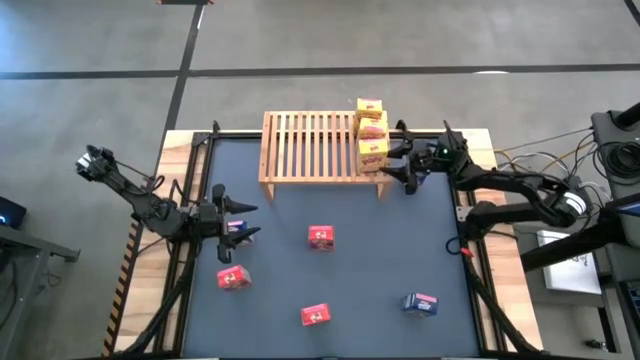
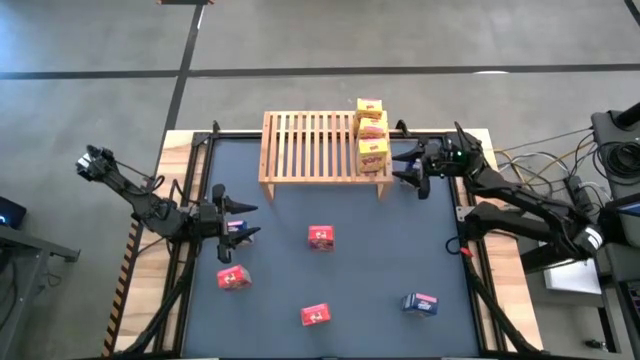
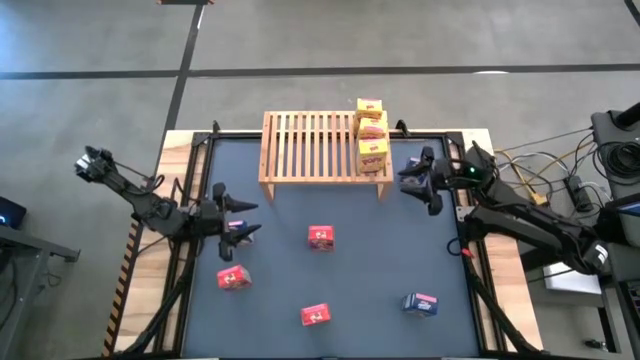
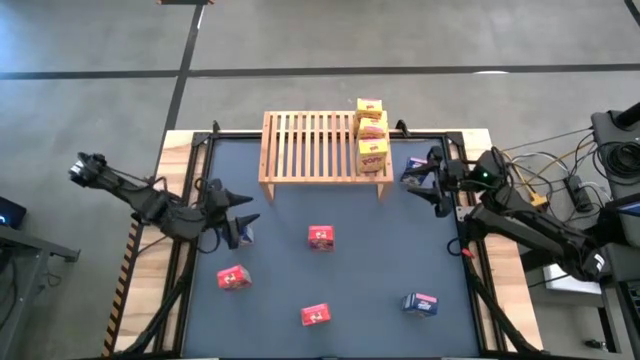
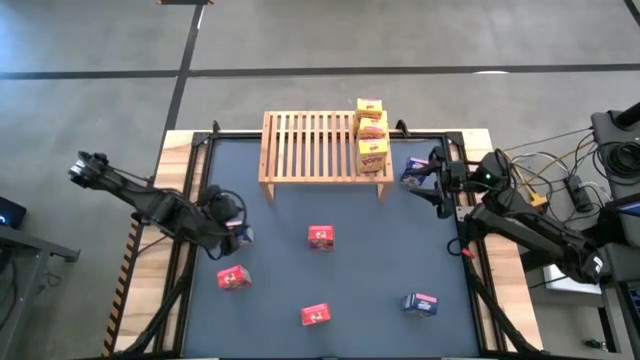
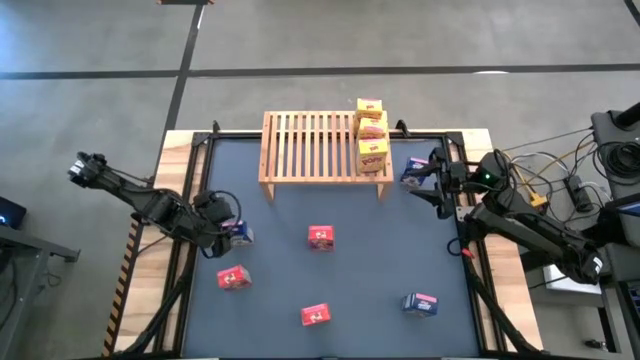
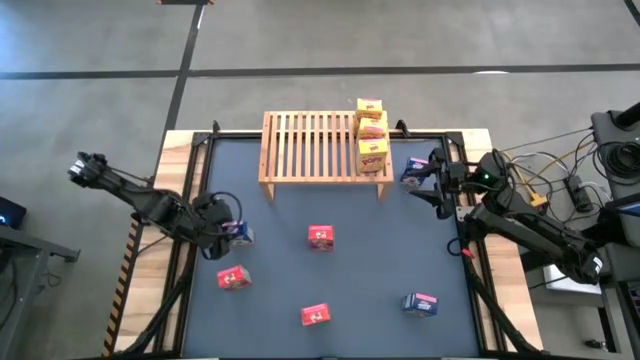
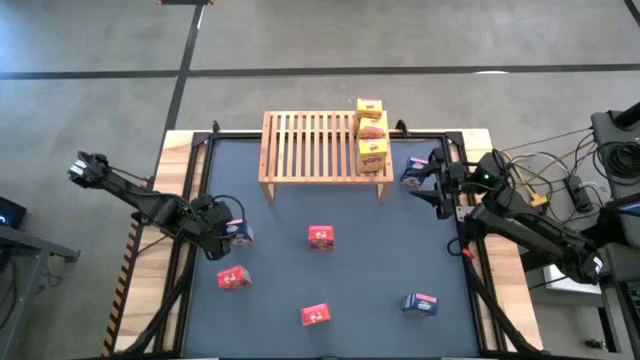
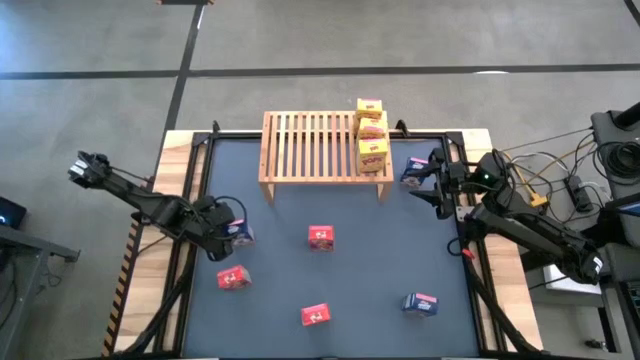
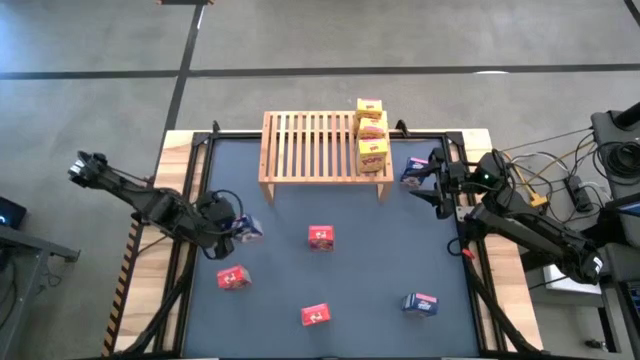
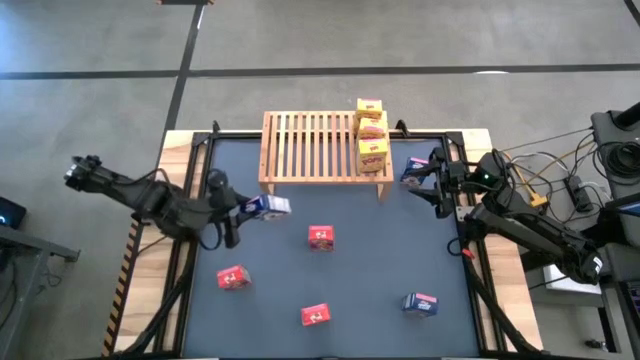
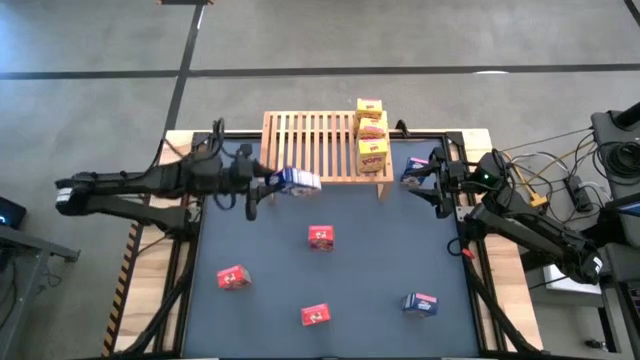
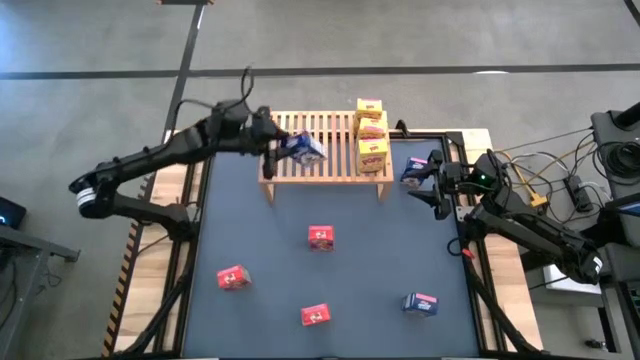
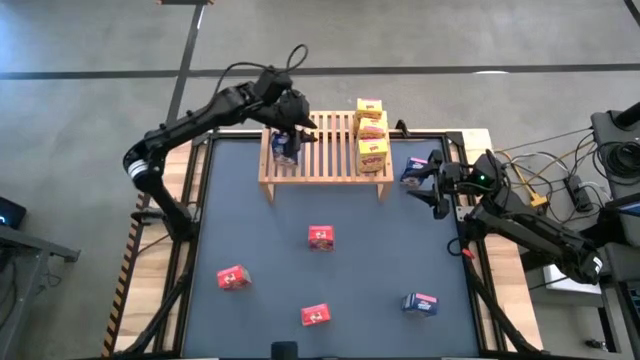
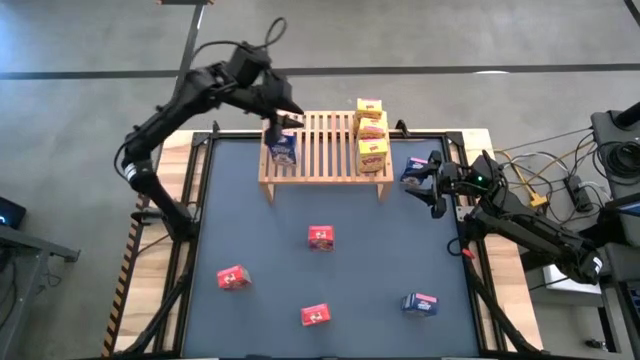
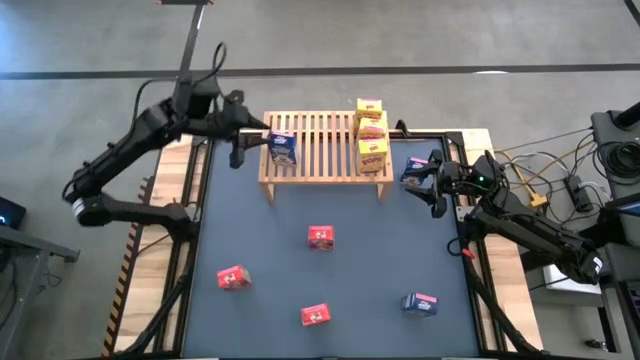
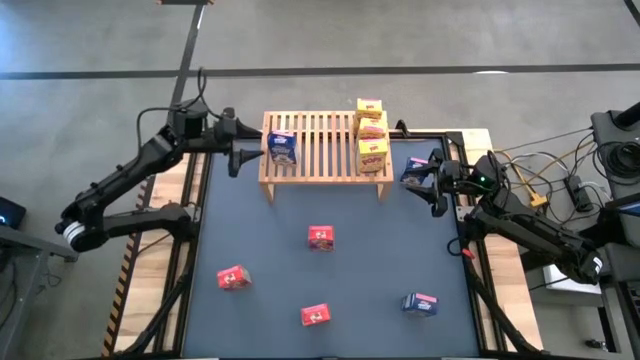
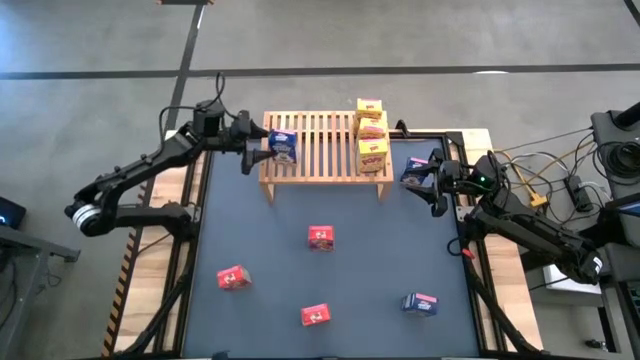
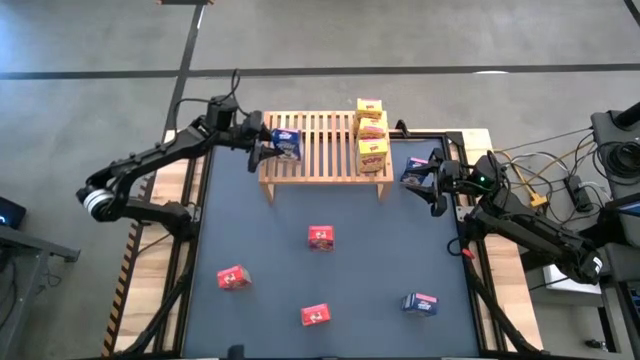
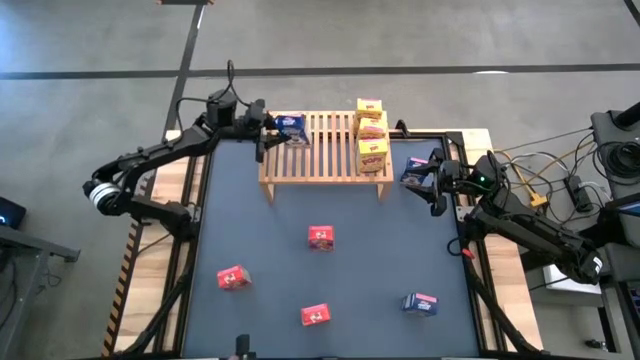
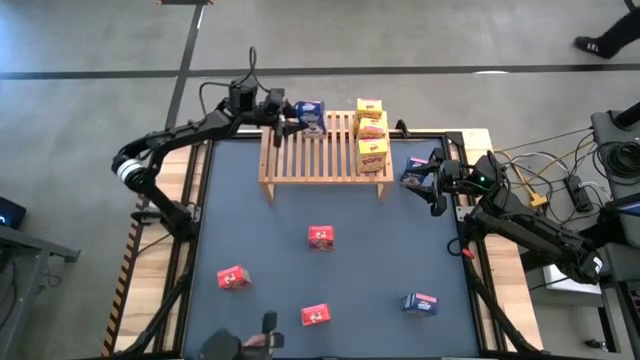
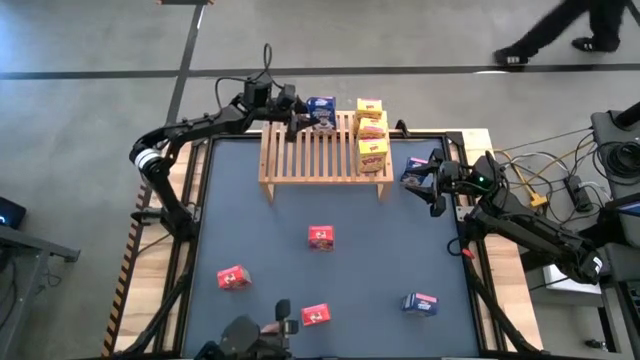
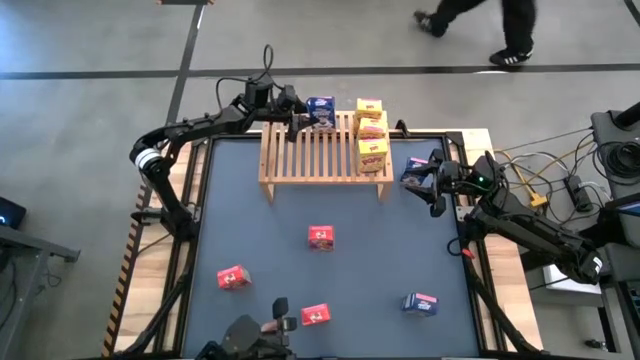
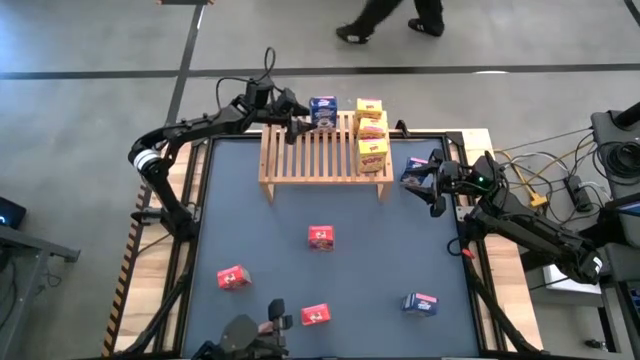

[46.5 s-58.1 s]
Task: Stack cereal on shelf
Put the left blue cereal box on the shelf

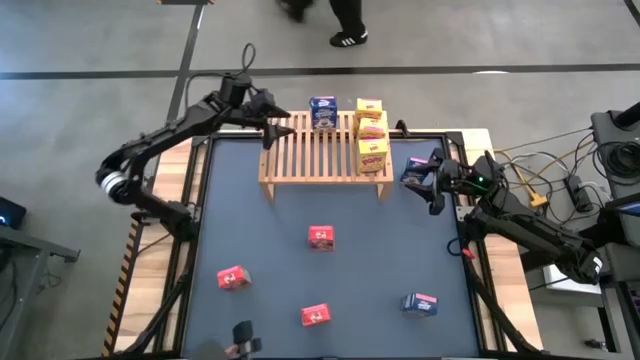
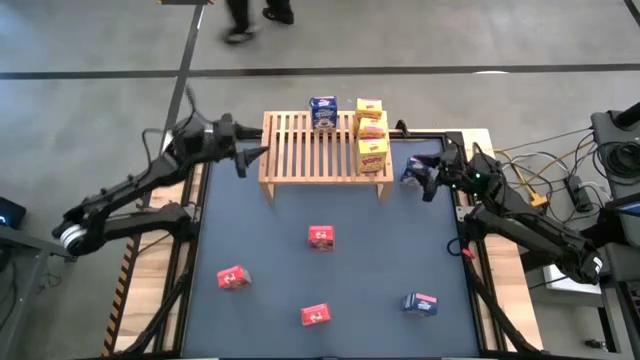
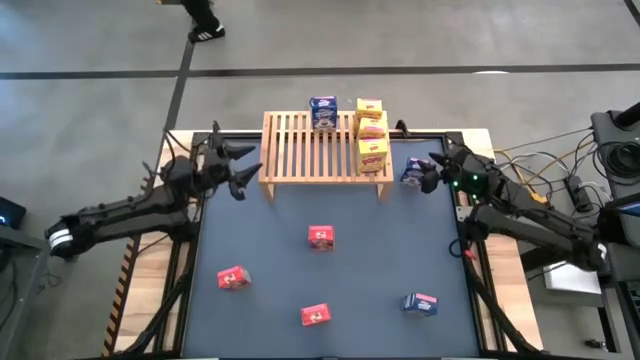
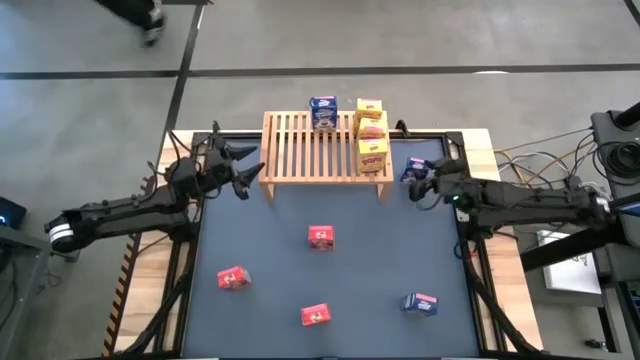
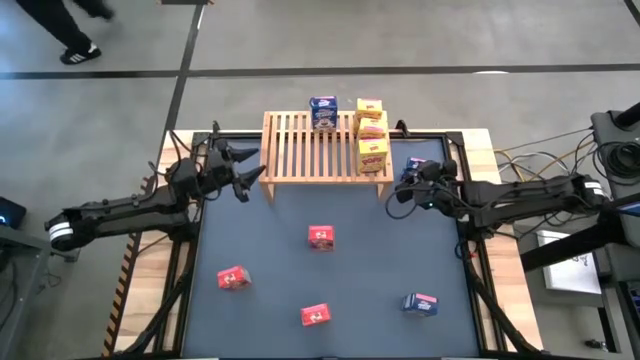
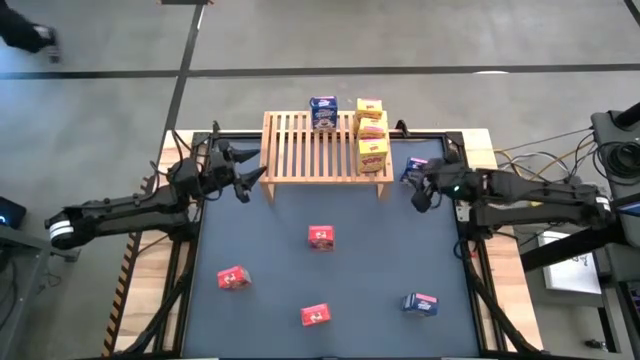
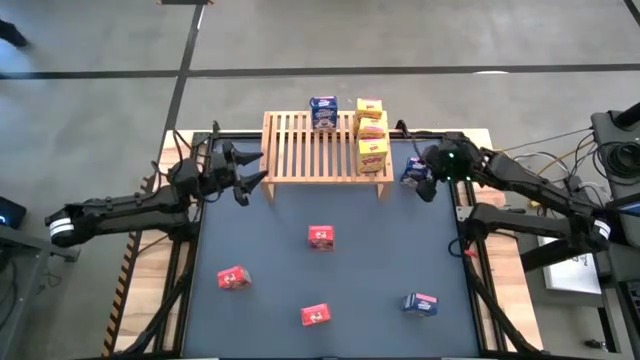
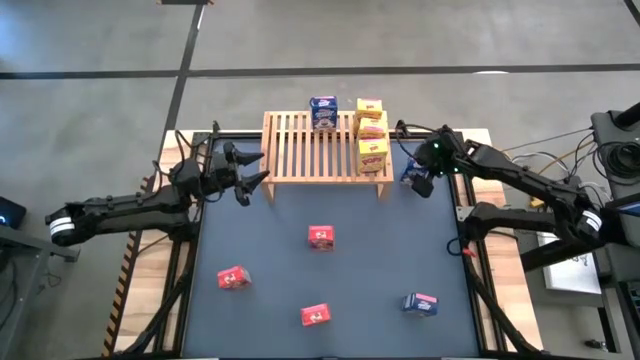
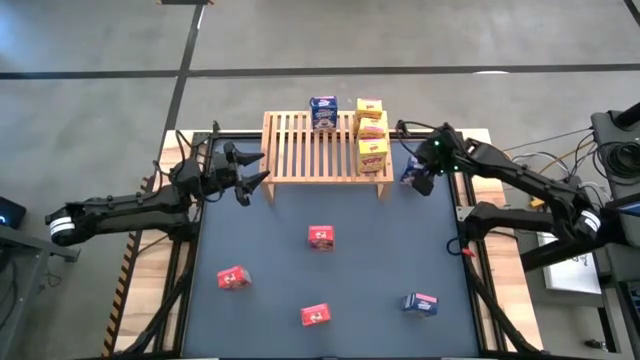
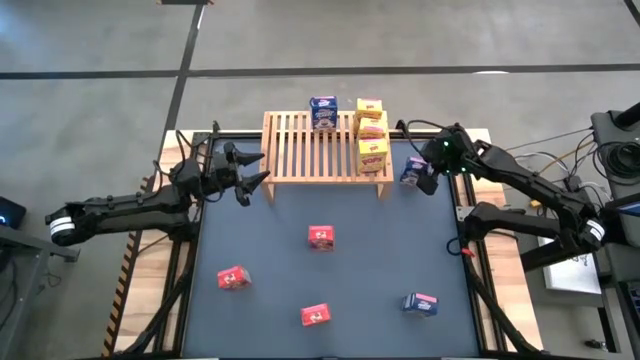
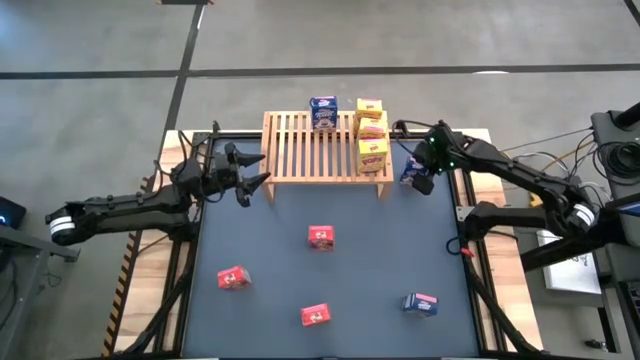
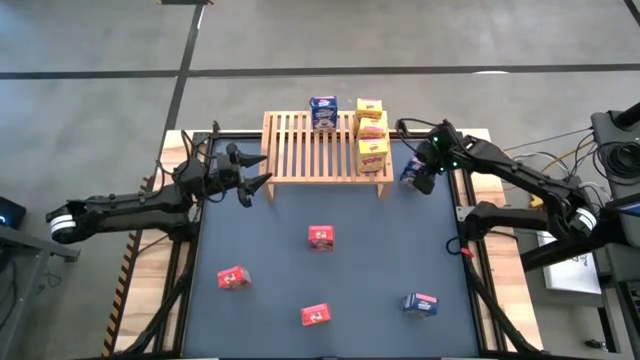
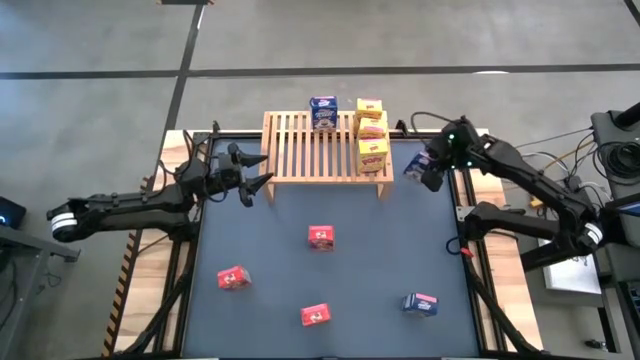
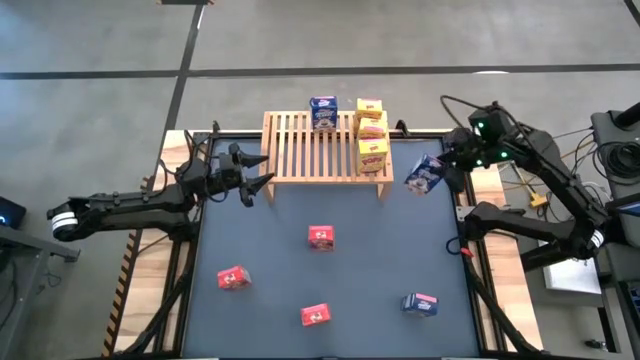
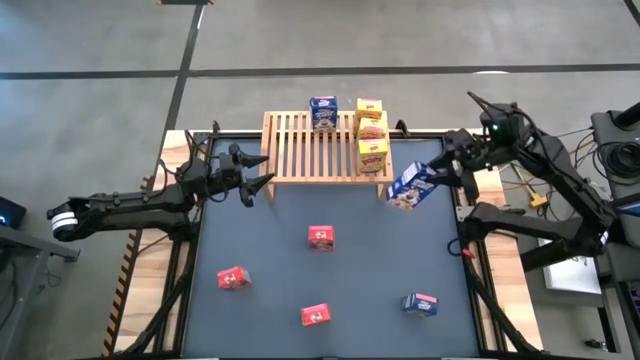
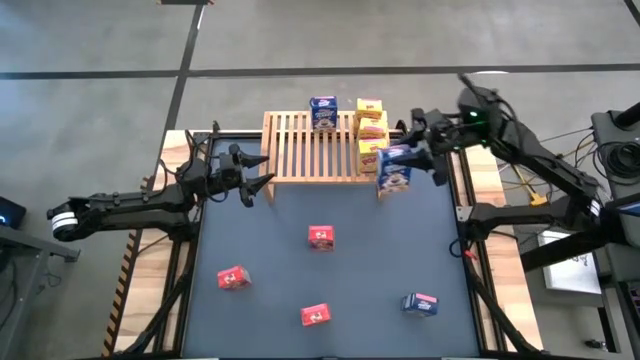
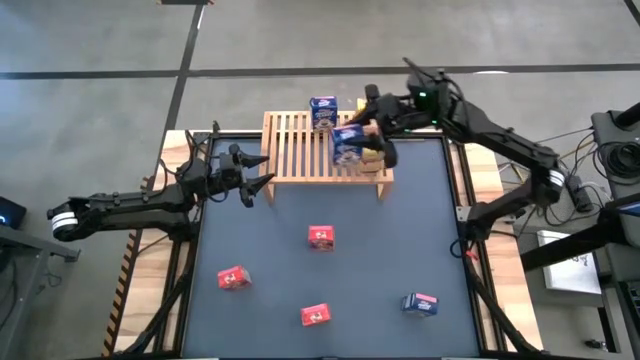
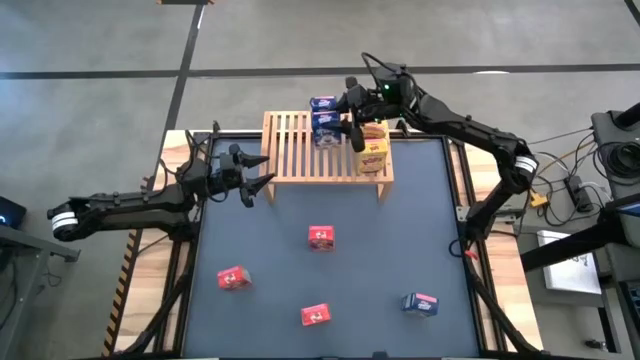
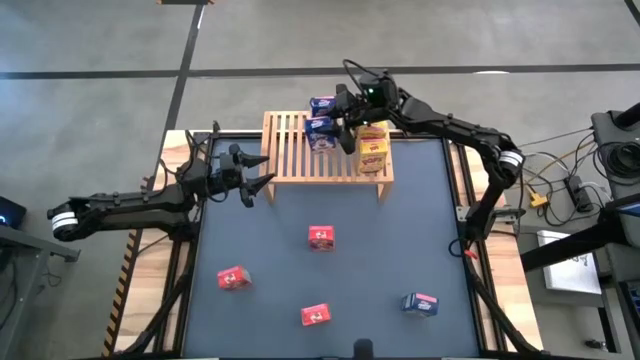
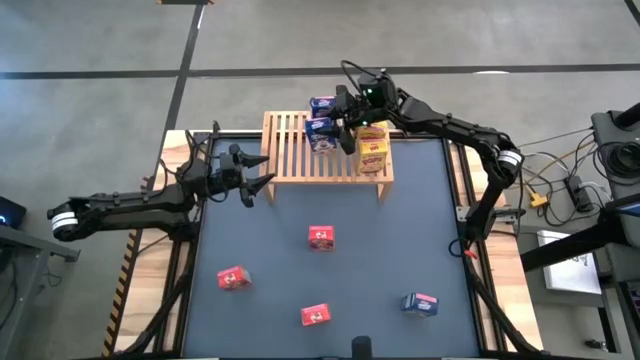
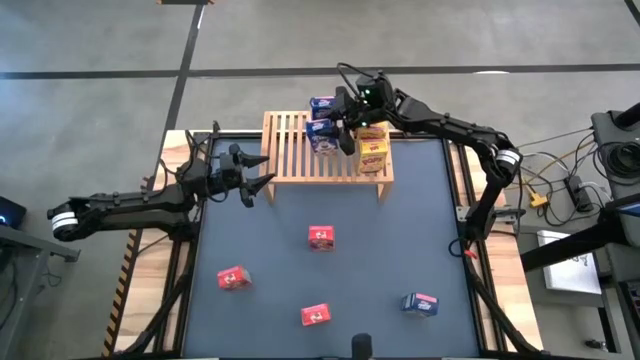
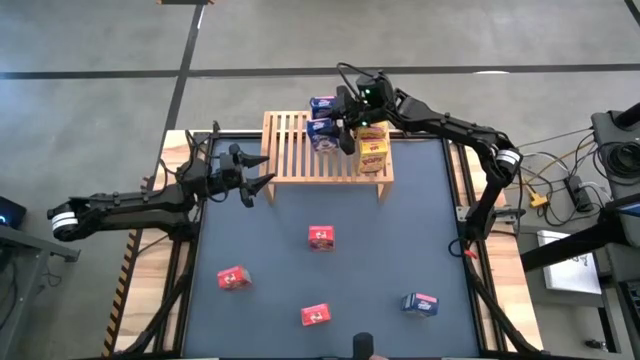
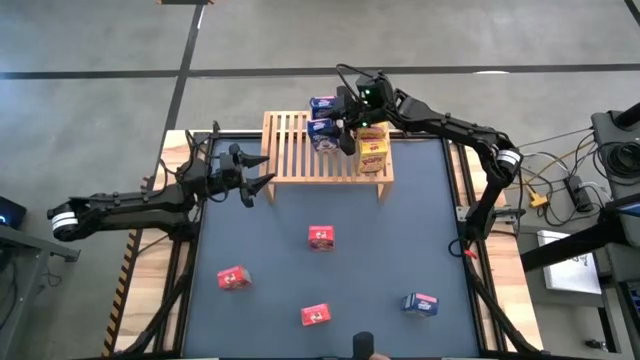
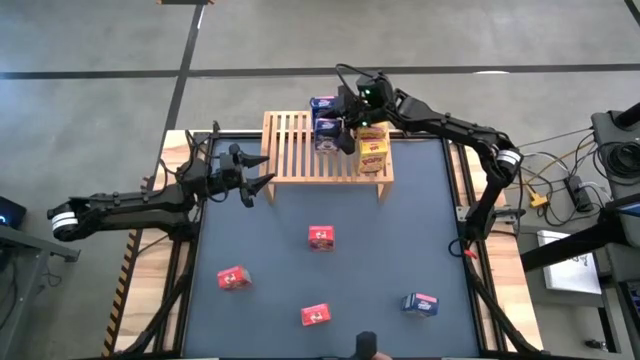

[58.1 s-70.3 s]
Put the top blue cereal box on the shelf aligned with the other blue cereal box
